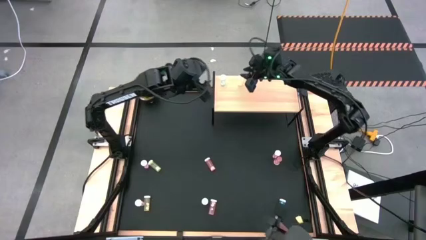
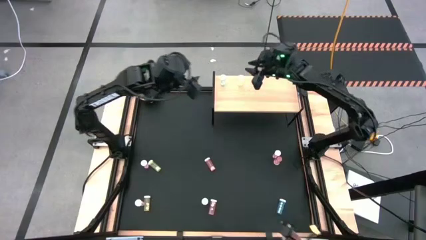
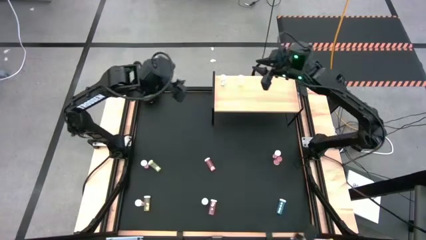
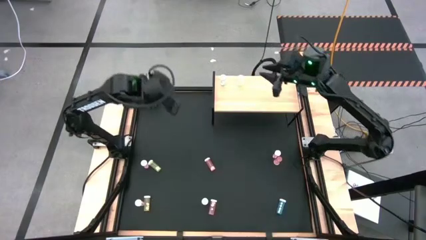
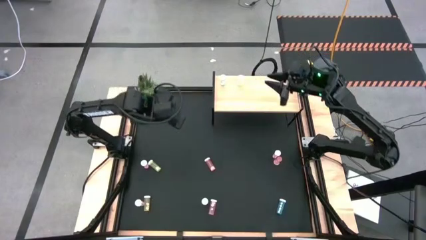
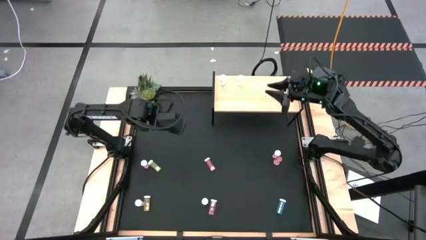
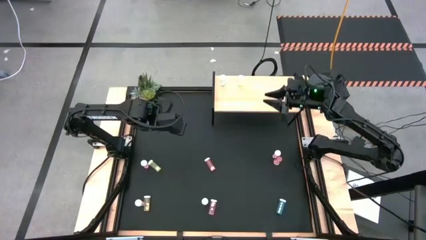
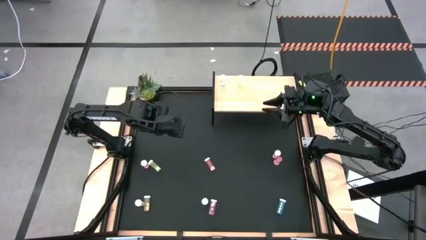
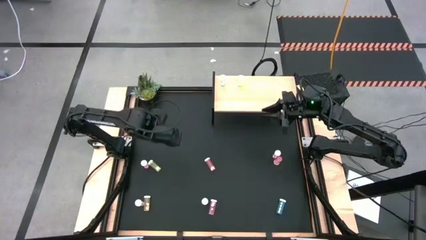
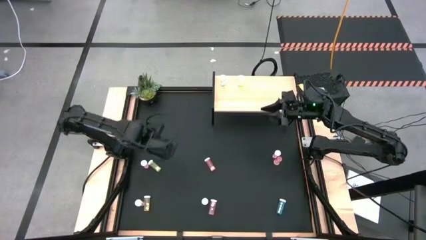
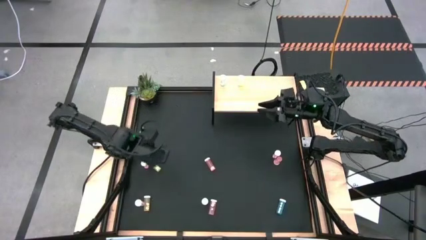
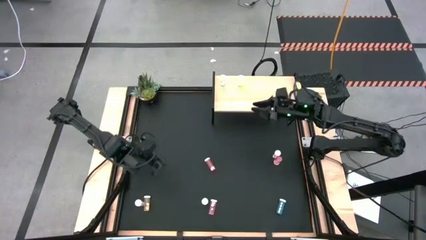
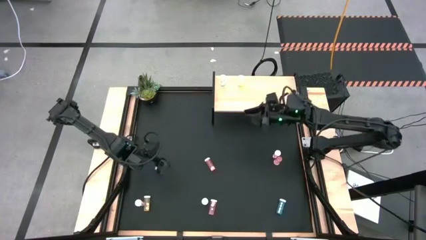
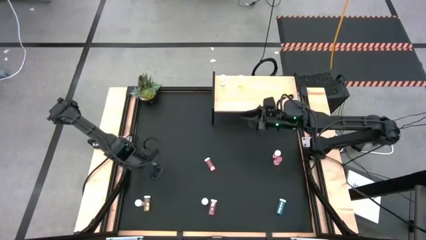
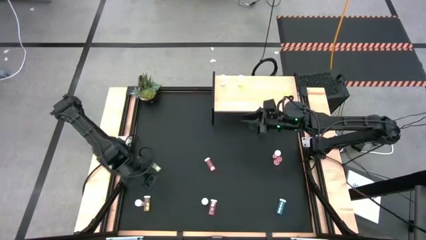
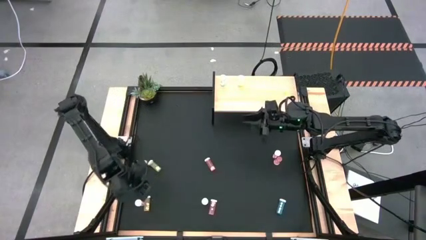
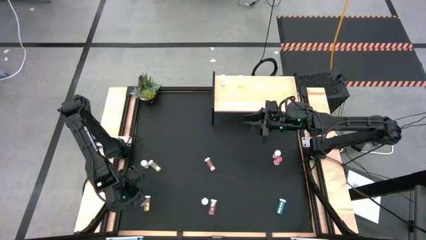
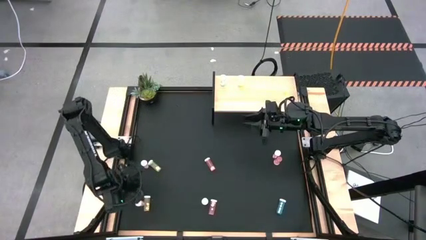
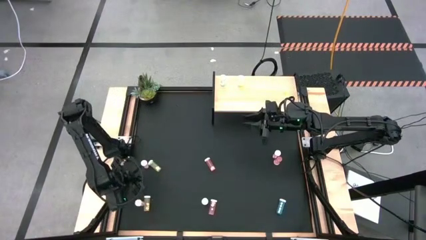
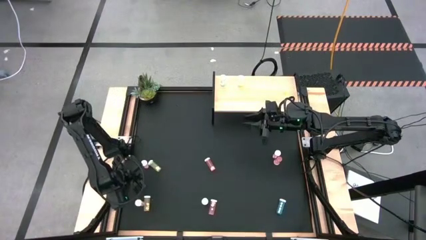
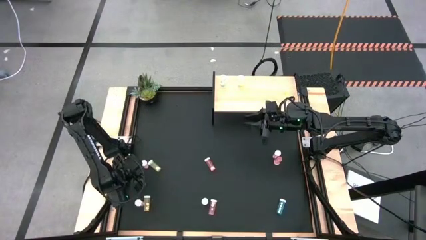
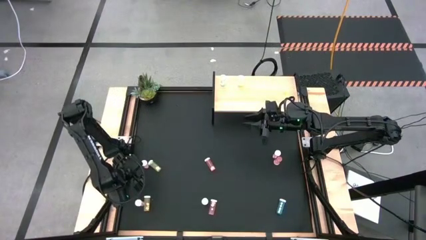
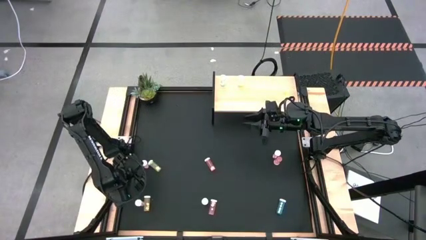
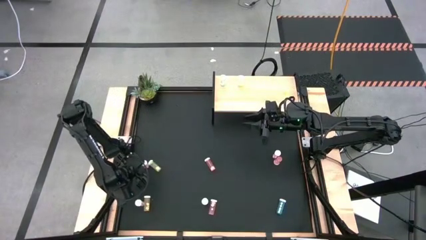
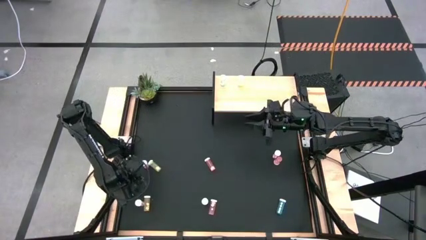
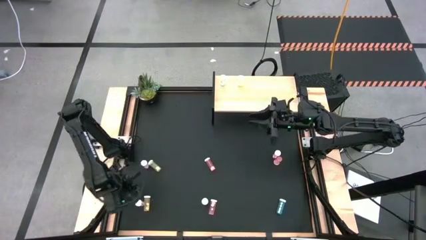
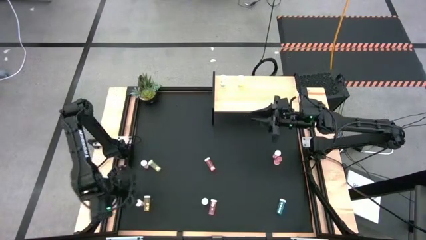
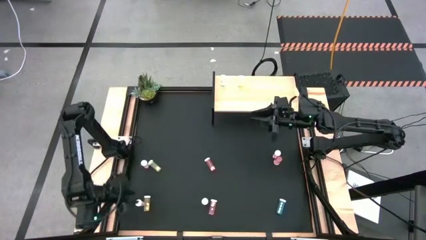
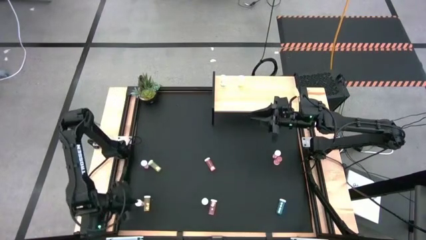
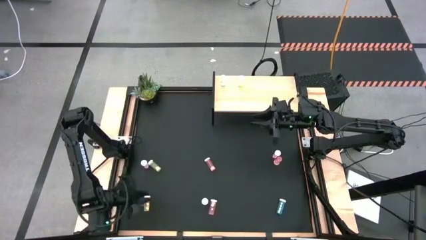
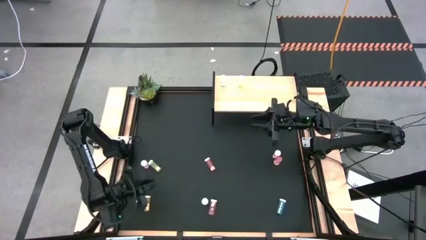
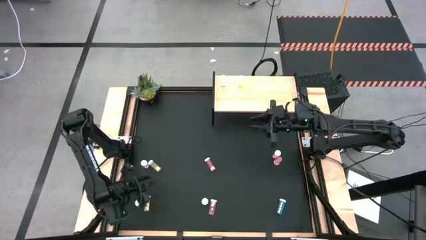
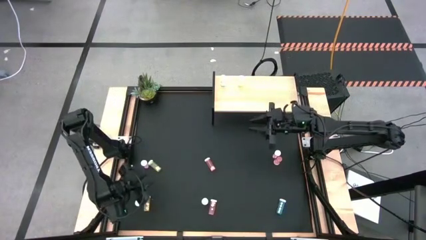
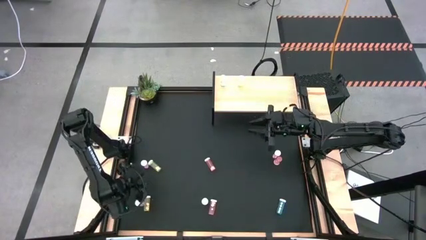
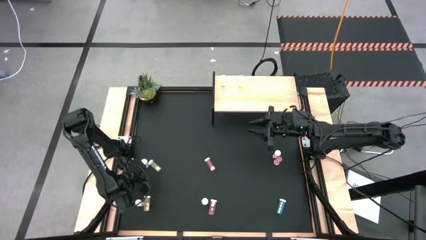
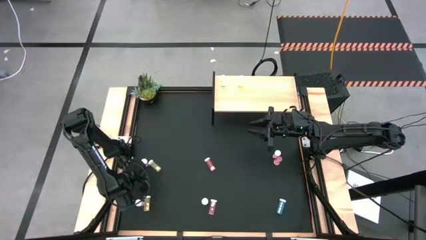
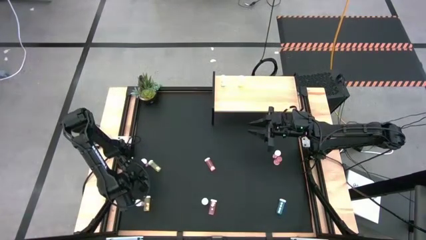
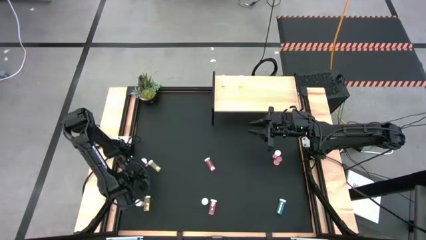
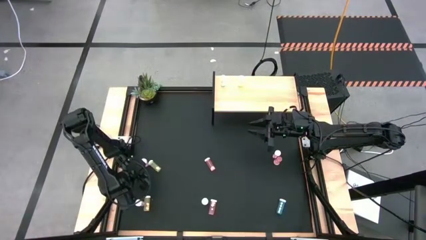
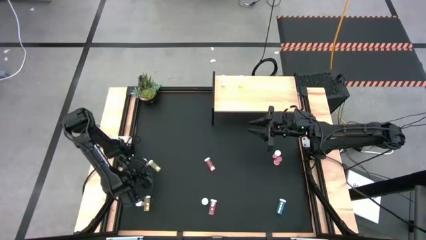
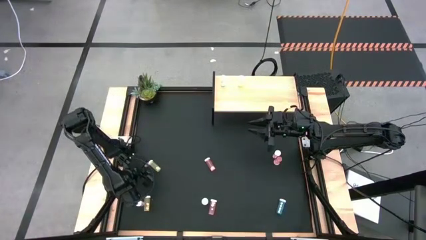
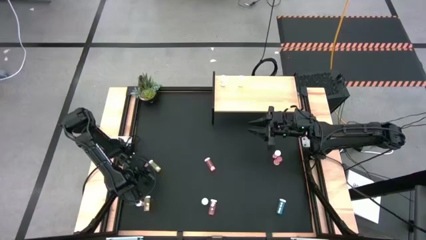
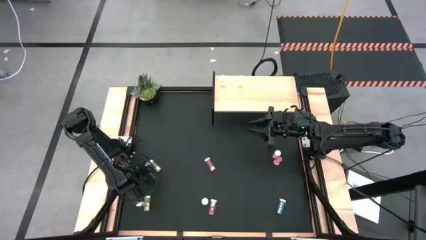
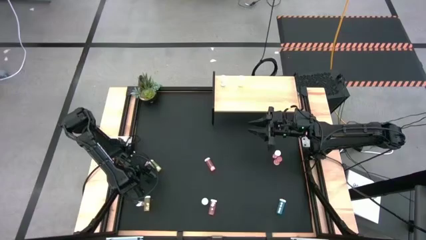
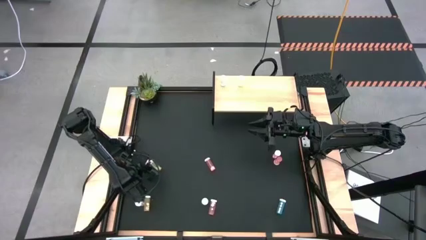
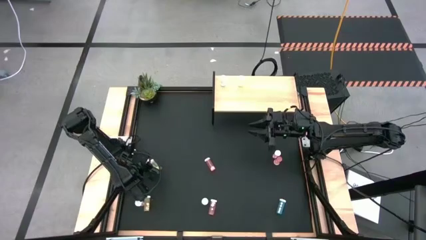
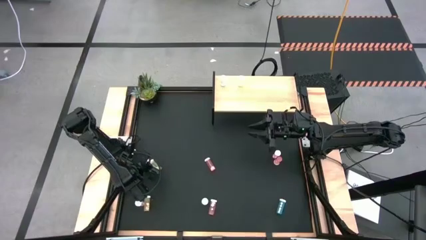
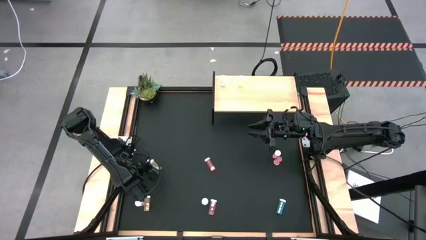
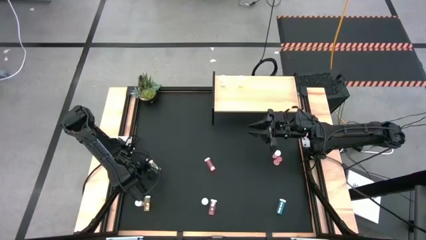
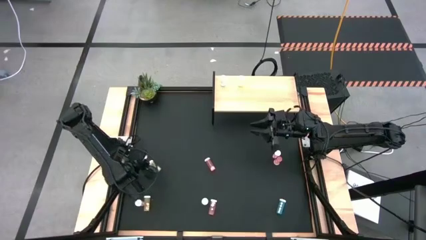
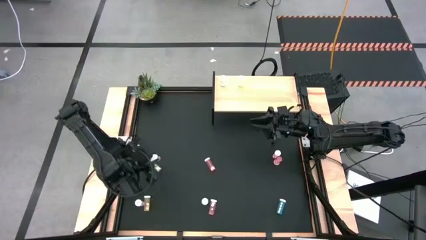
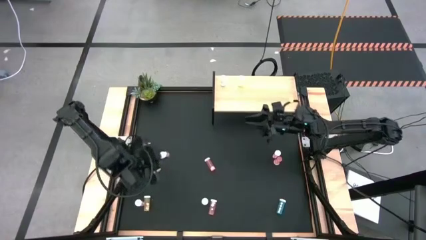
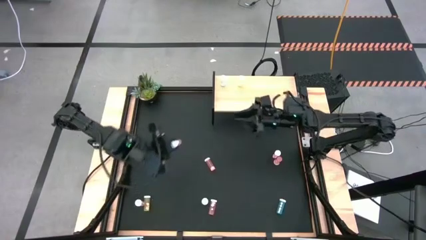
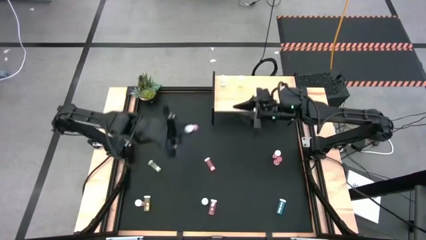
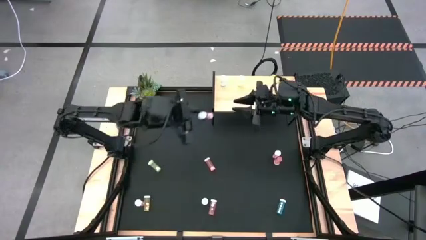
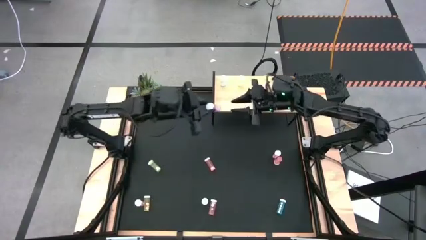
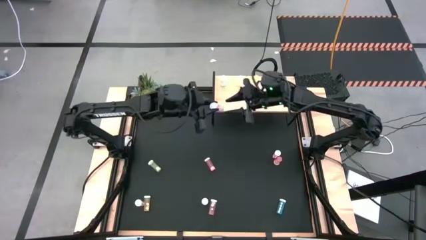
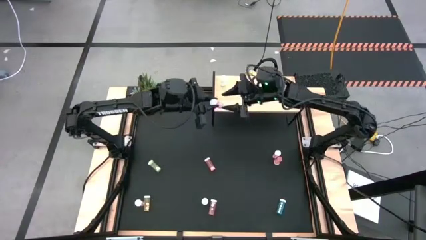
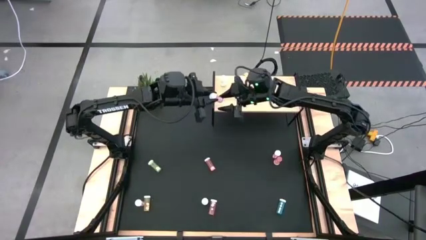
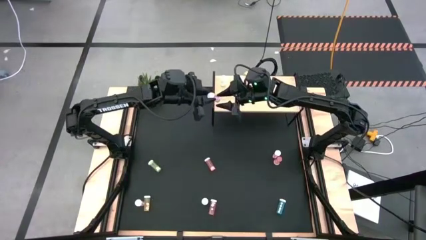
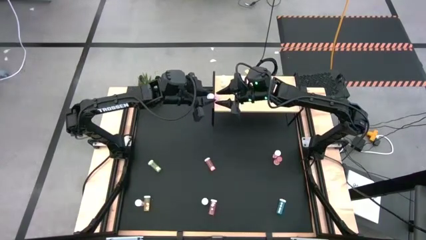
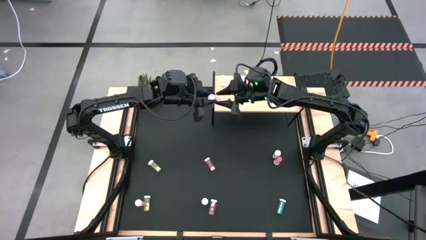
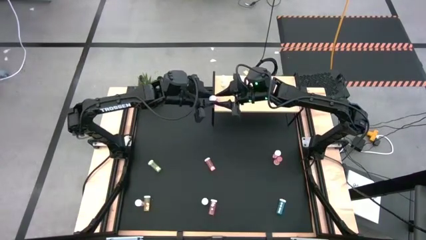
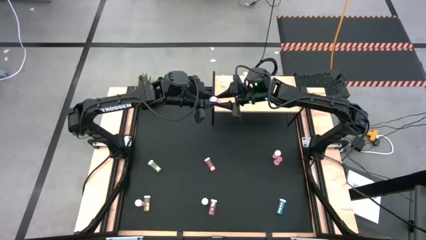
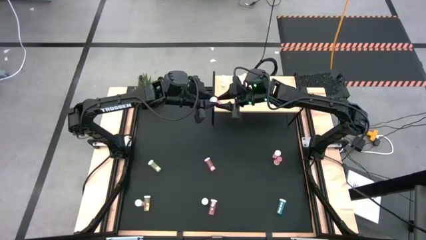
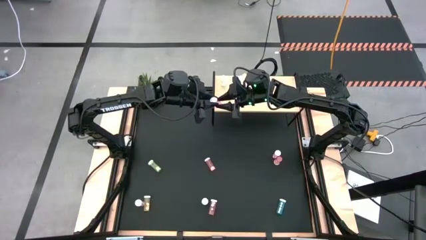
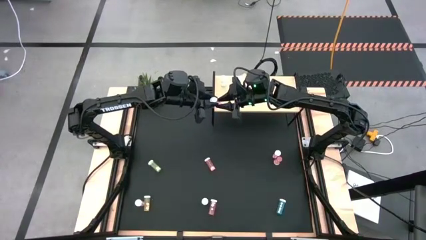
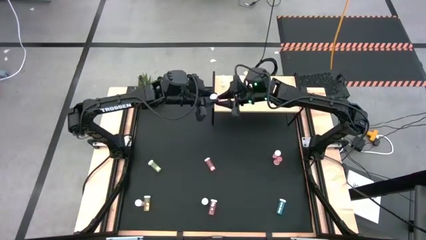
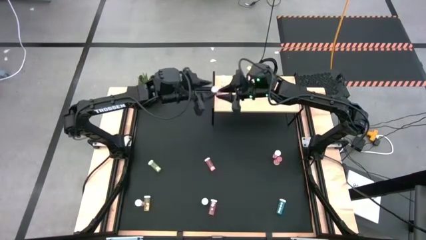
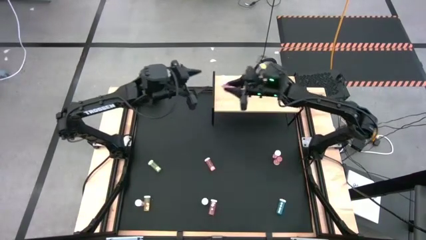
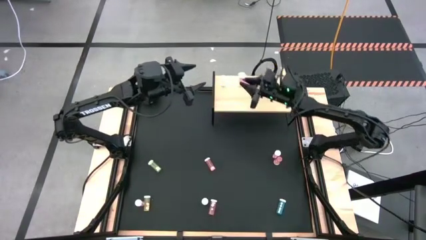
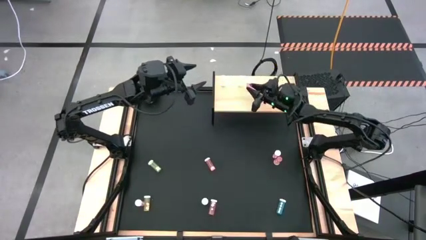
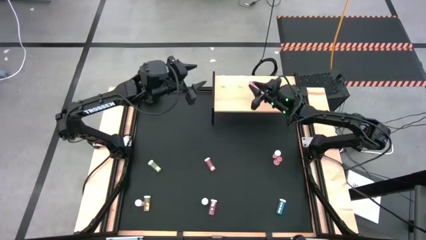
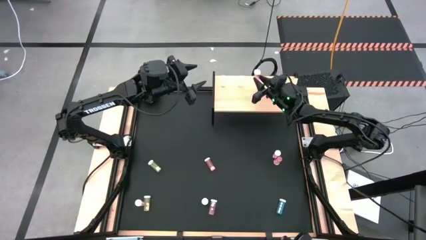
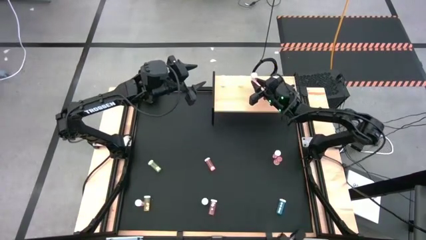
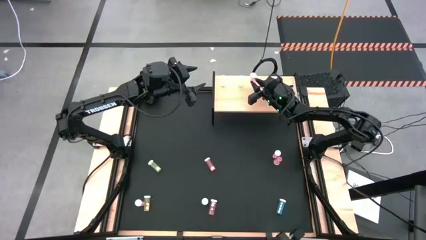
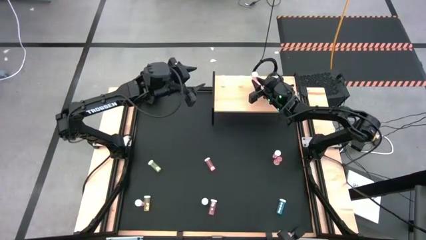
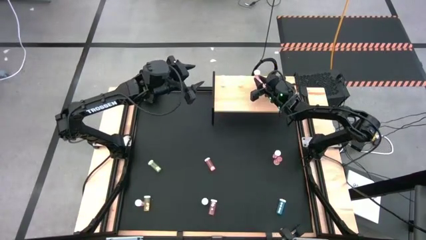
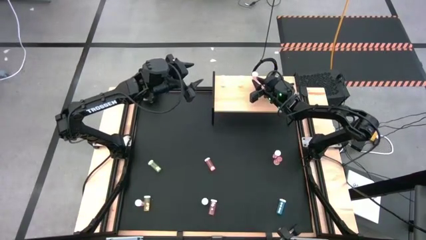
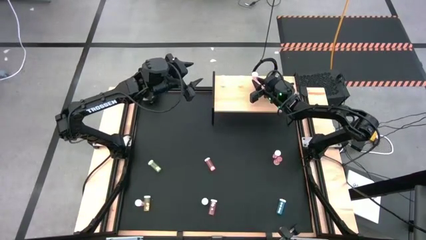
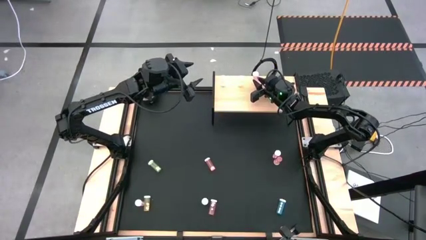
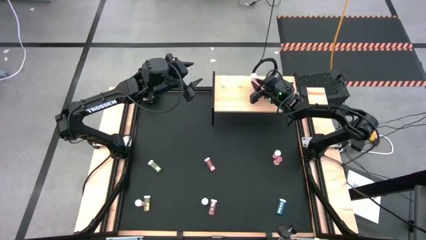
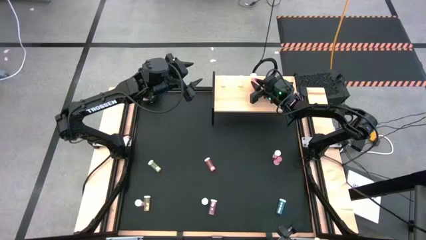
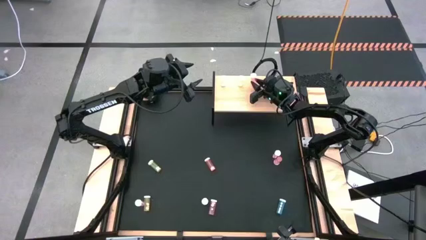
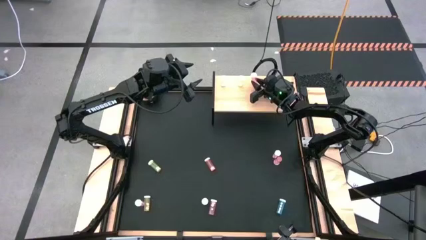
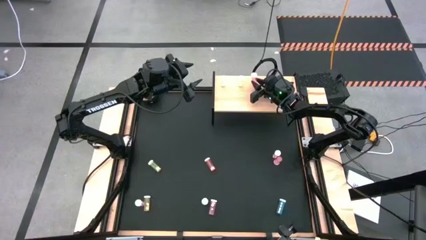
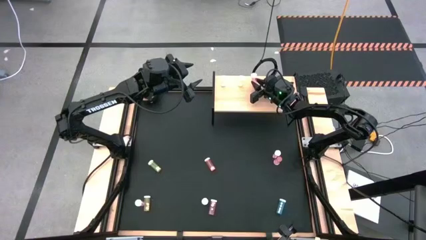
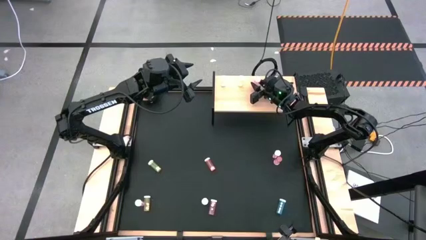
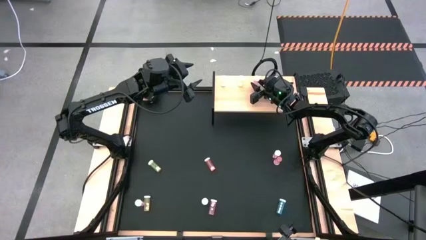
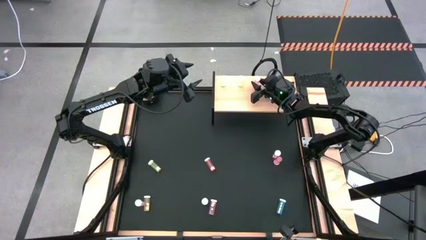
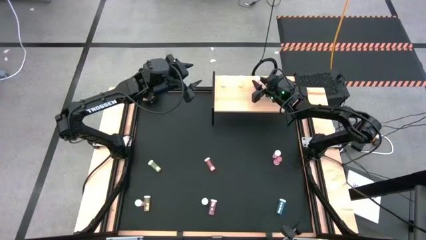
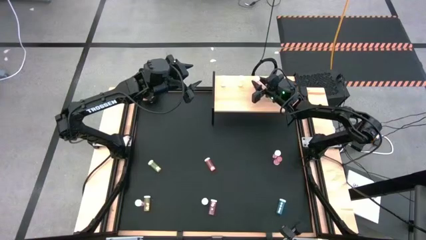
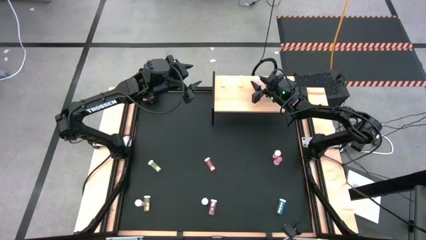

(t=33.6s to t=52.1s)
Task: Pick and place medicine bottles onto shelf by color
Put the left pink pill bottle on the shelf
